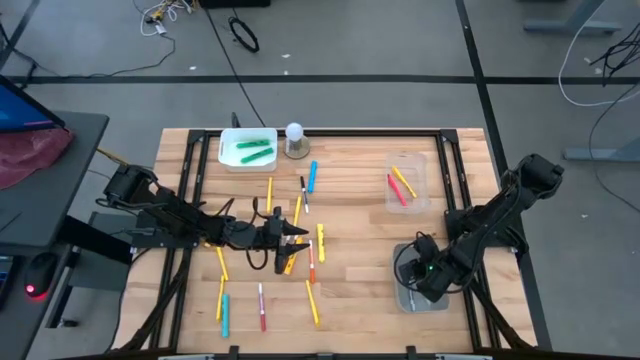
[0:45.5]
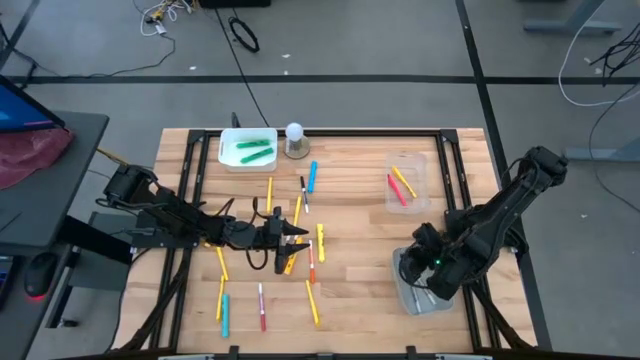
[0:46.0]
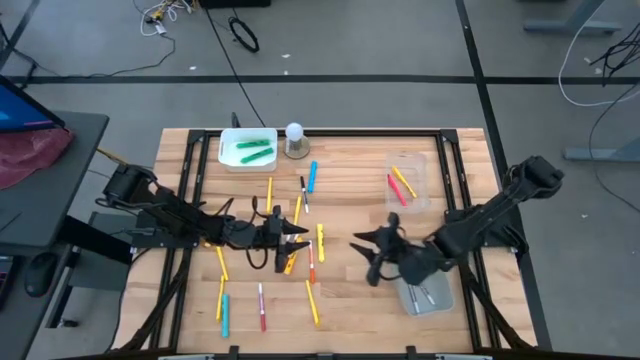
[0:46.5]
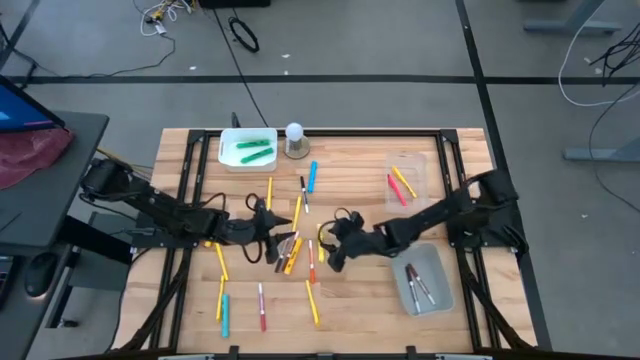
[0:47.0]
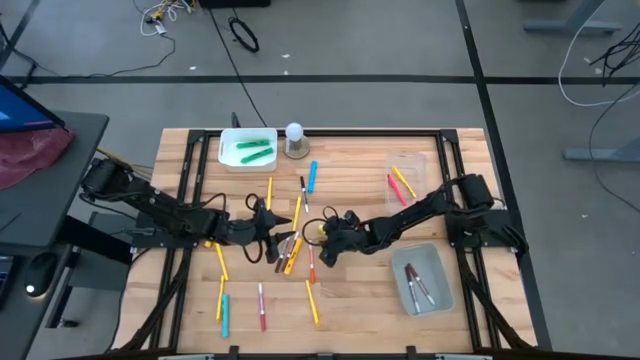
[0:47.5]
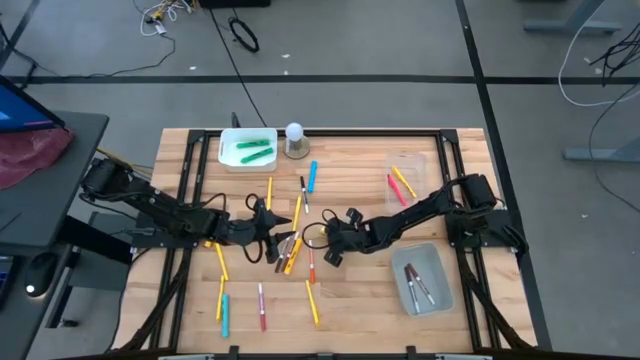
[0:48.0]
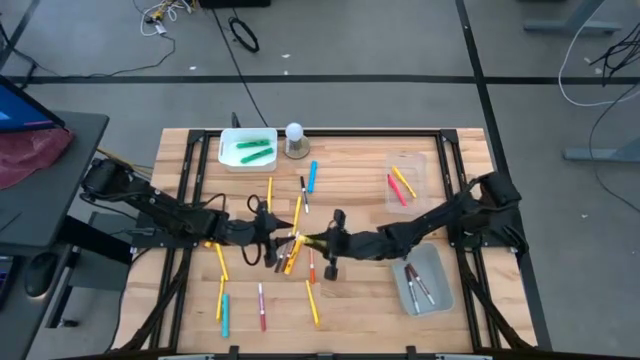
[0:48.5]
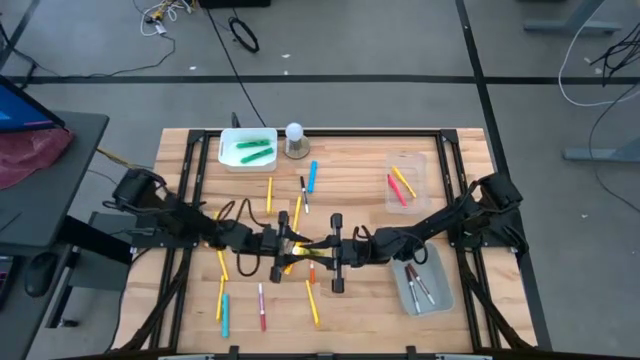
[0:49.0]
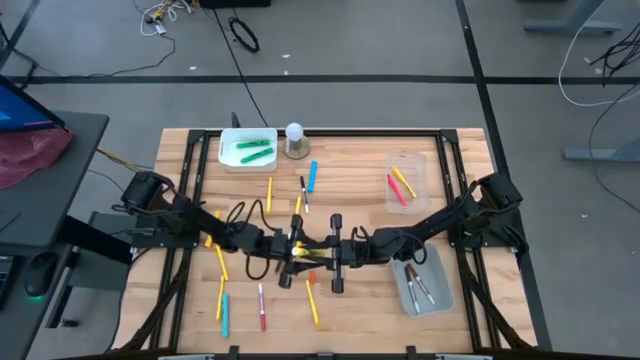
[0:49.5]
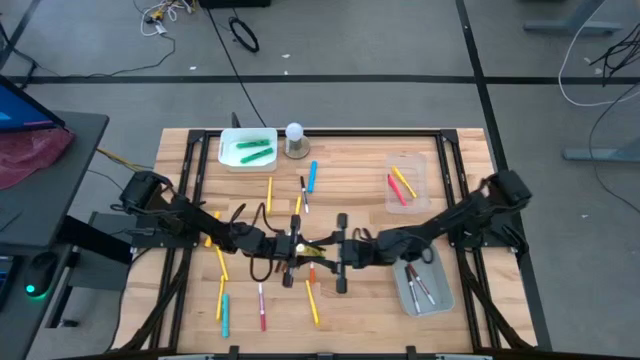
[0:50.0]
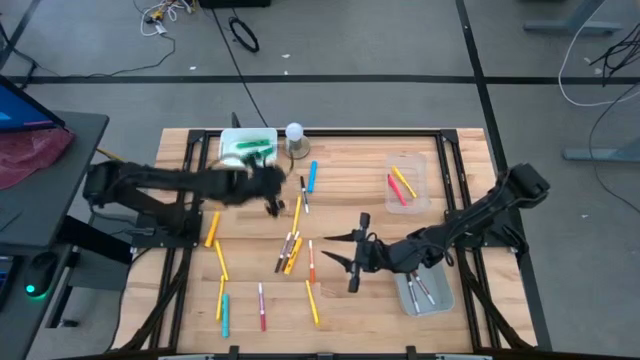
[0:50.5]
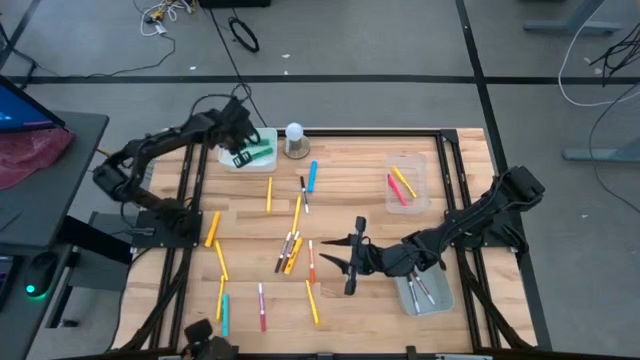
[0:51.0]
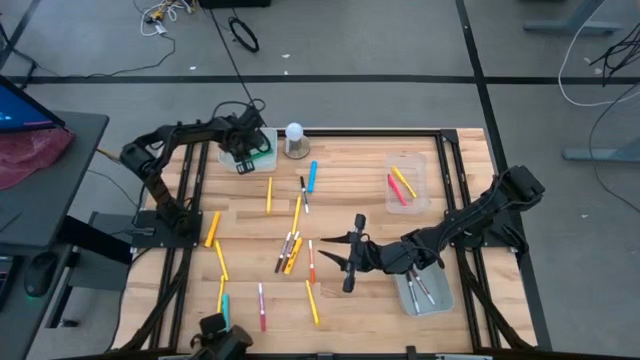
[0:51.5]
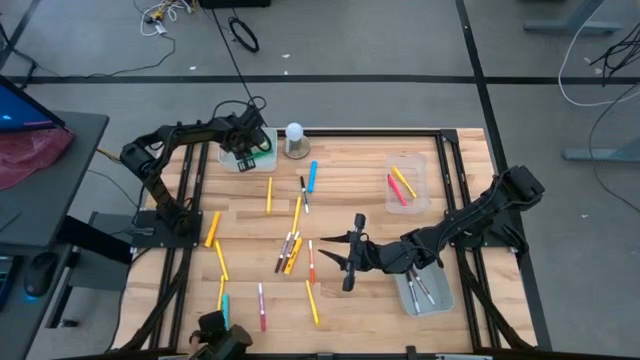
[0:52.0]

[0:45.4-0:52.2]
Task: Pick & Place Markers
Put the large yellow highlighter into the white bin

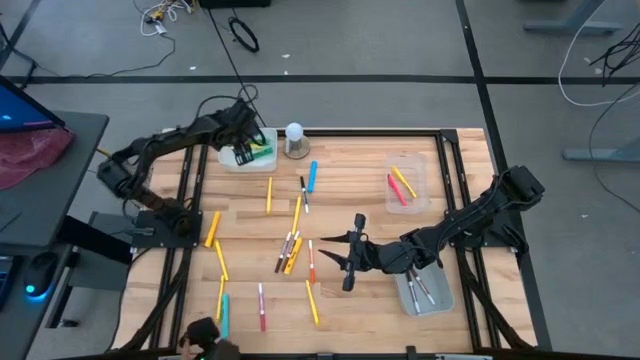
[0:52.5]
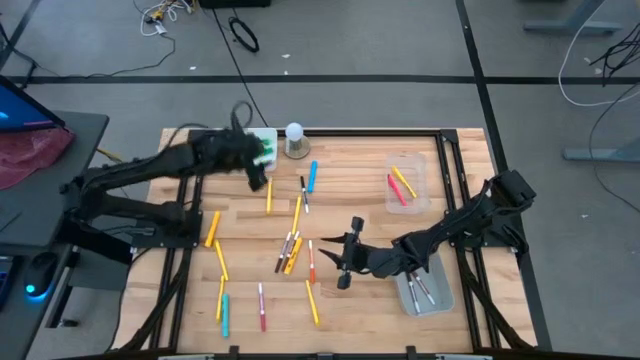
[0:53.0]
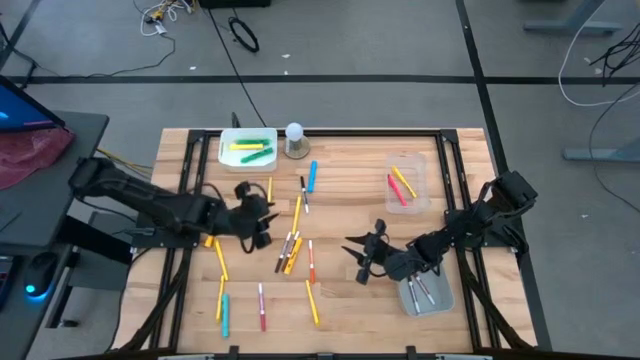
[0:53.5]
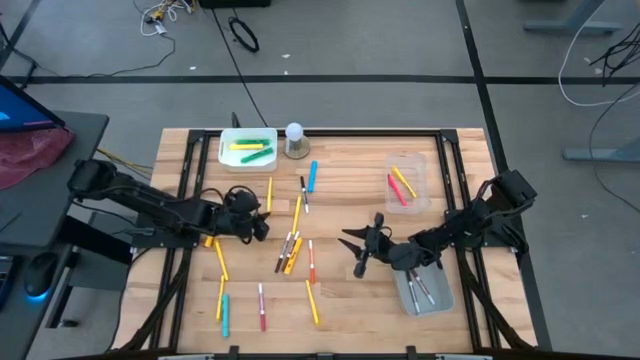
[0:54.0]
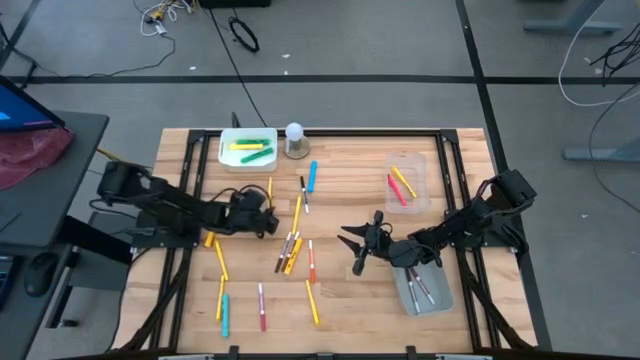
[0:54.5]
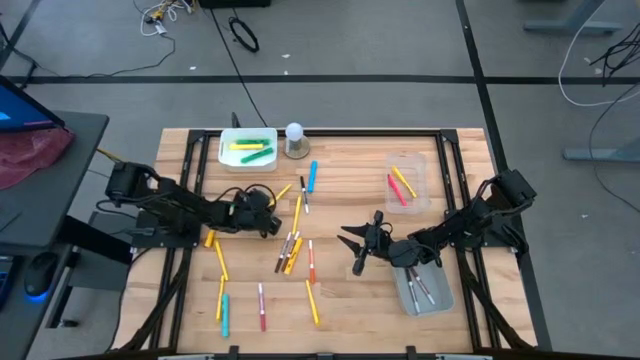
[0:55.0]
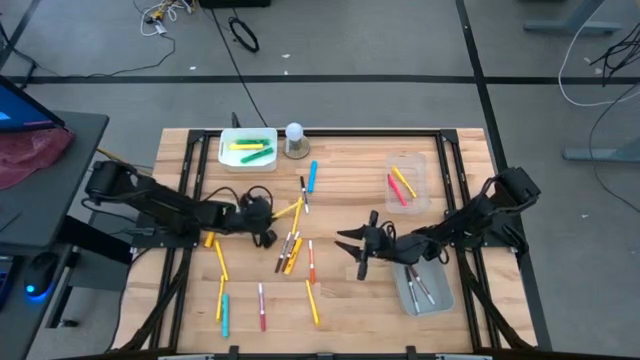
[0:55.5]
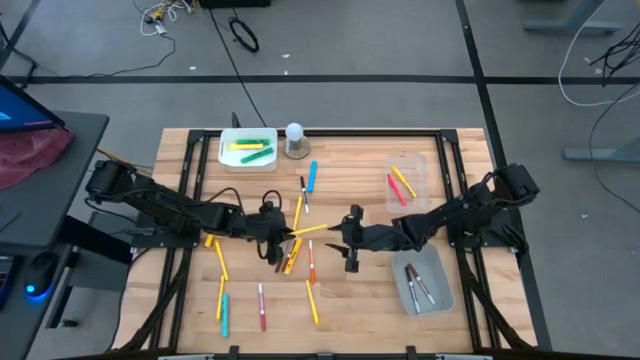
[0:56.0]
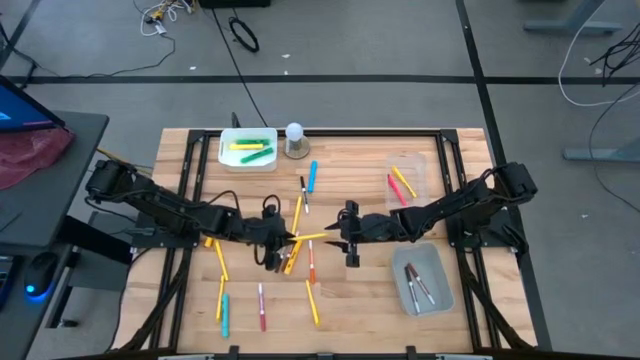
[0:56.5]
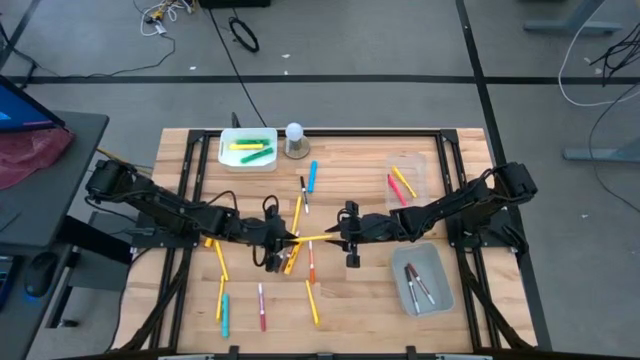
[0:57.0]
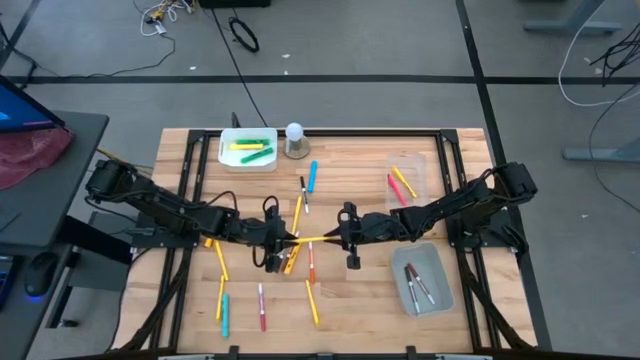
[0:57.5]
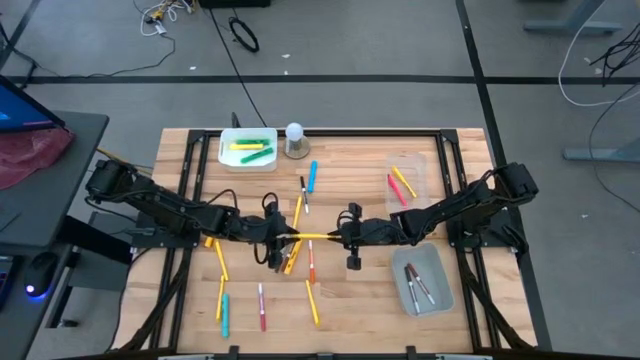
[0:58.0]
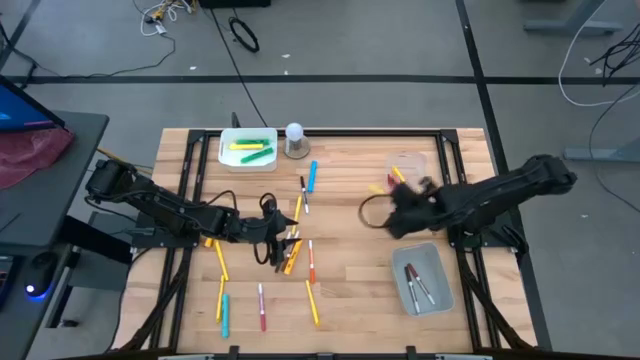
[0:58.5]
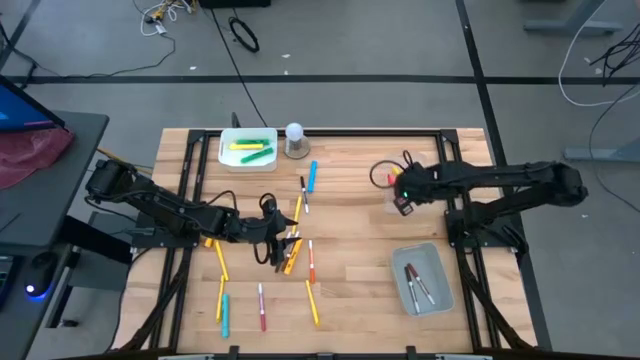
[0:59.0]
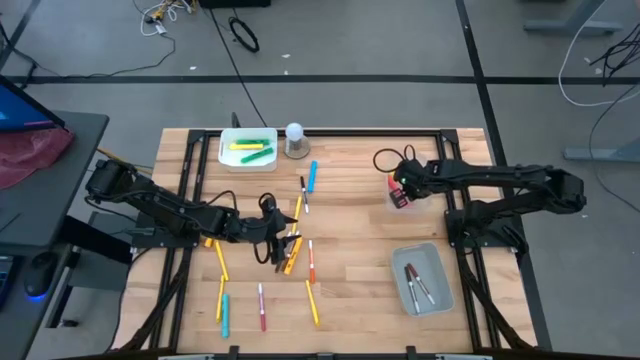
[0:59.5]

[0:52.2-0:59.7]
Put the yellow pen into the transparent bin

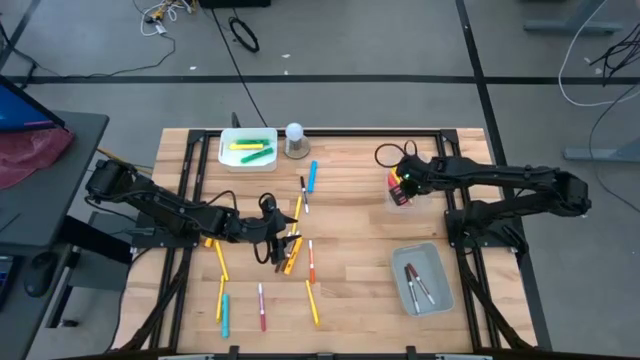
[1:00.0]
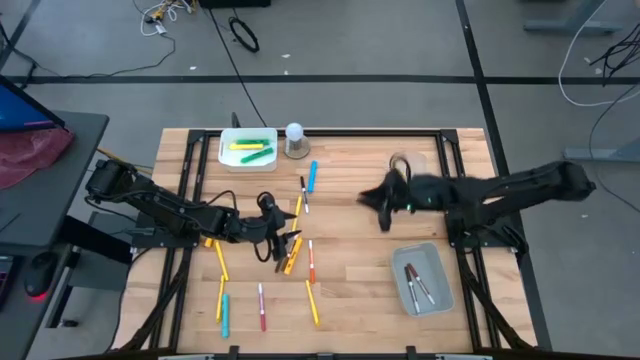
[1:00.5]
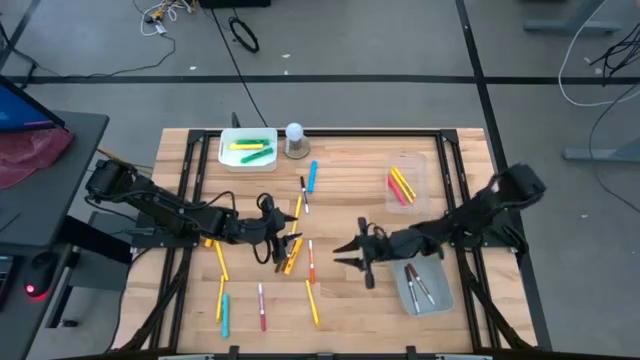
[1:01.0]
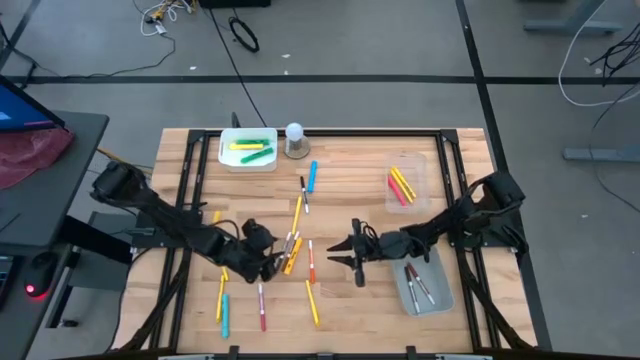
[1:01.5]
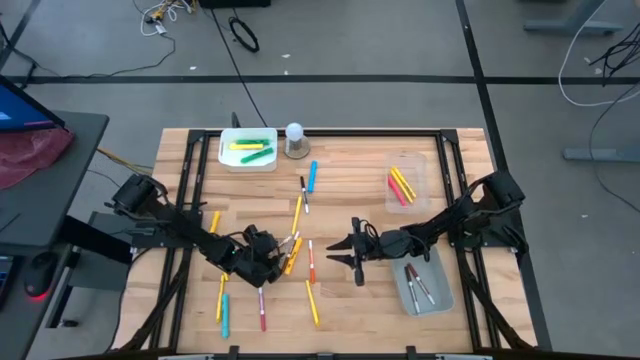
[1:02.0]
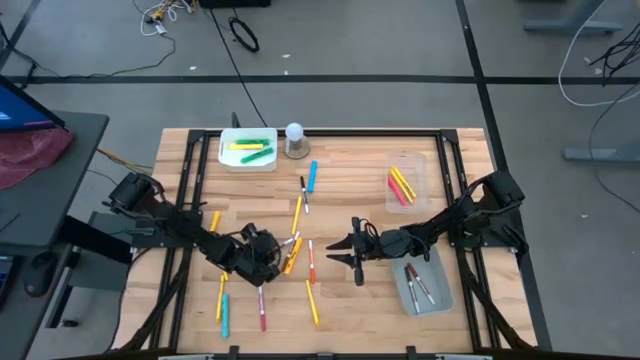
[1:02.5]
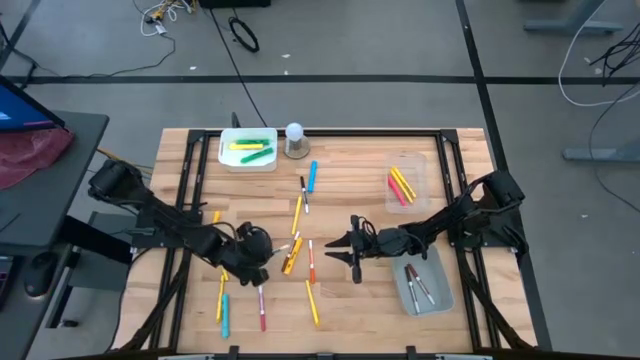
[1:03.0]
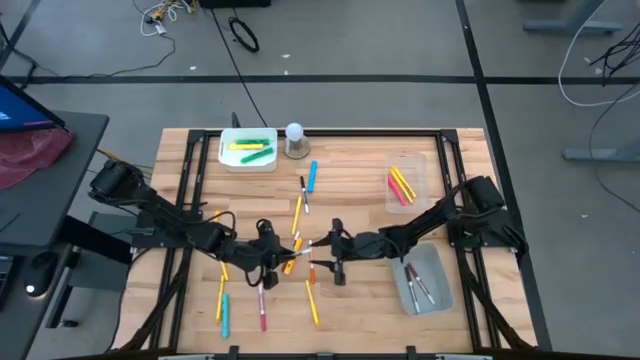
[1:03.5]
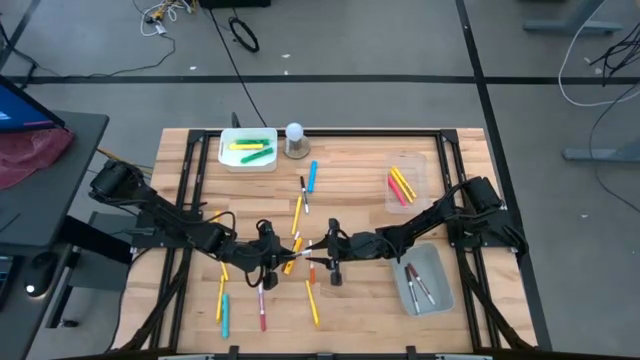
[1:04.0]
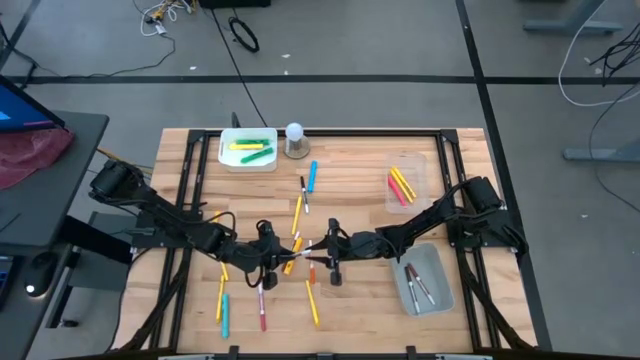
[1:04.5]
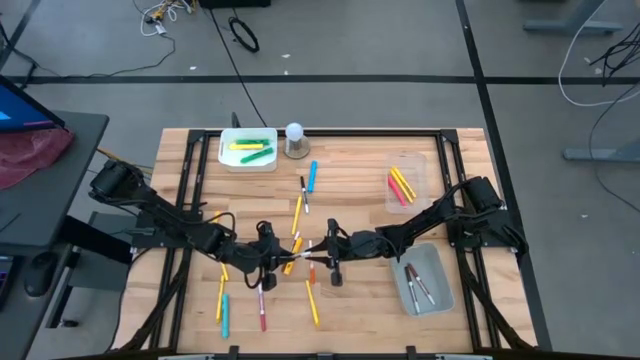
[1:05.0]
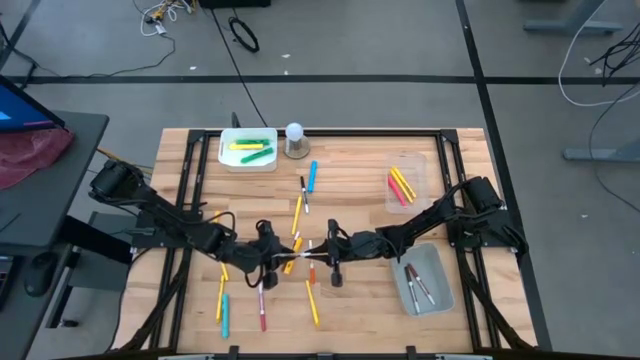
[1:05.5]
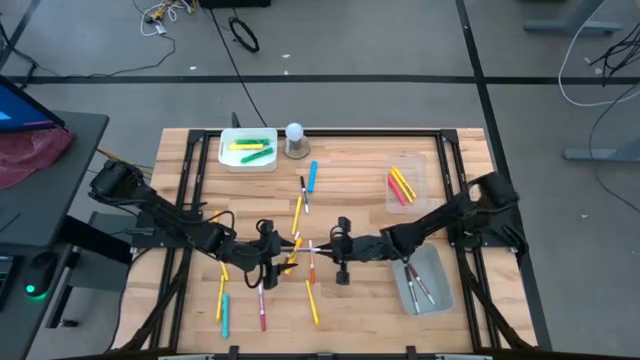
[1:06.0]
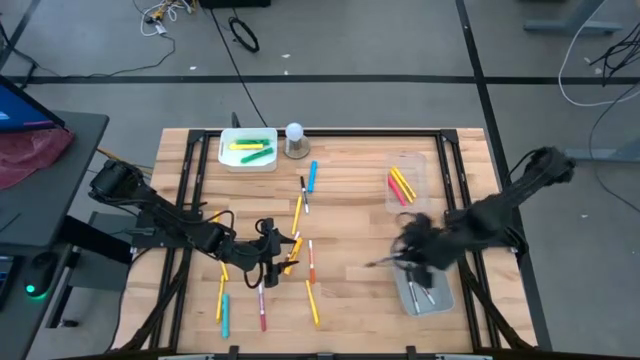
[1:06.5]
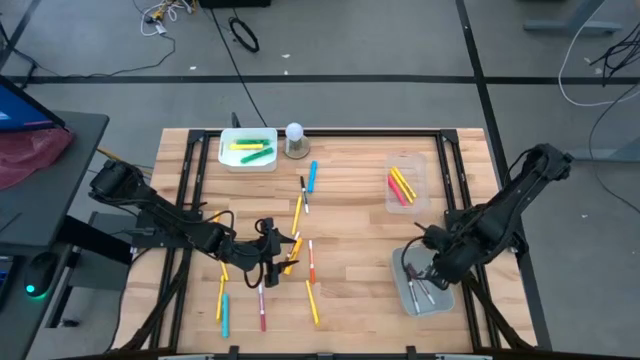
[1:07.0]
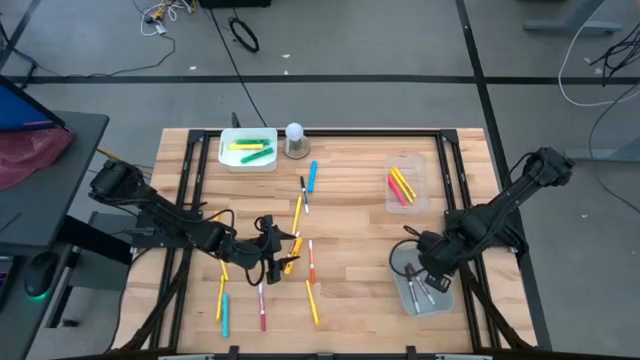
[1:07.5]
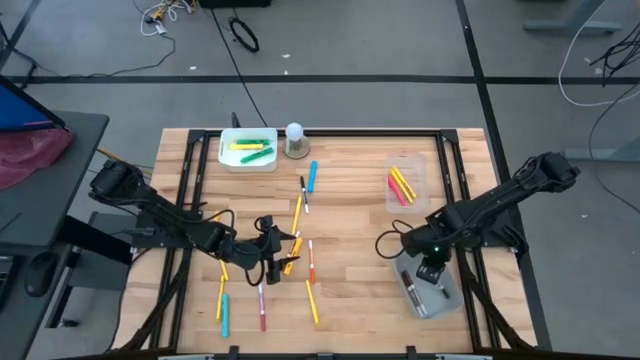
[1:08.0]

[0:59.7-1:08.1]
Put the brown marker pen into the gray bin
